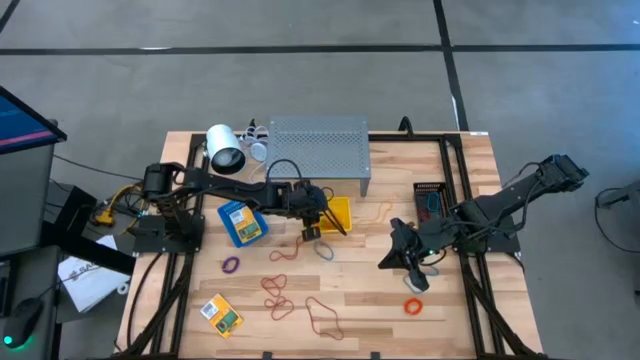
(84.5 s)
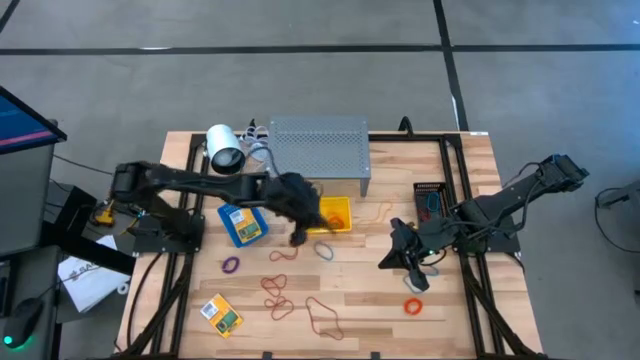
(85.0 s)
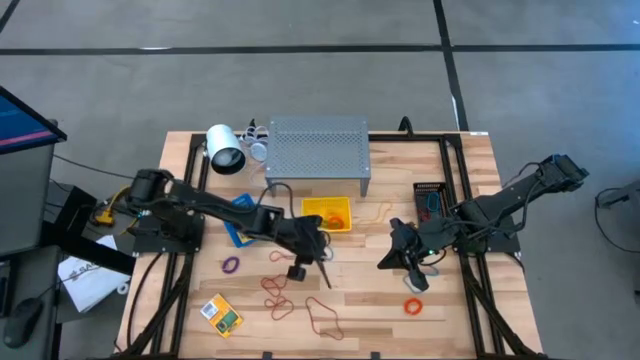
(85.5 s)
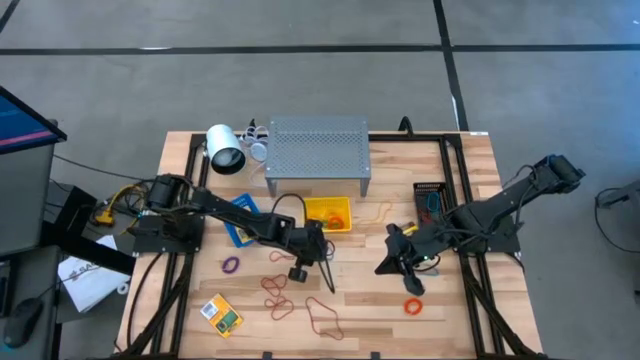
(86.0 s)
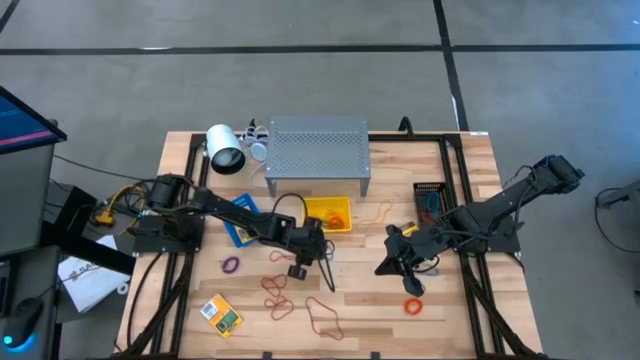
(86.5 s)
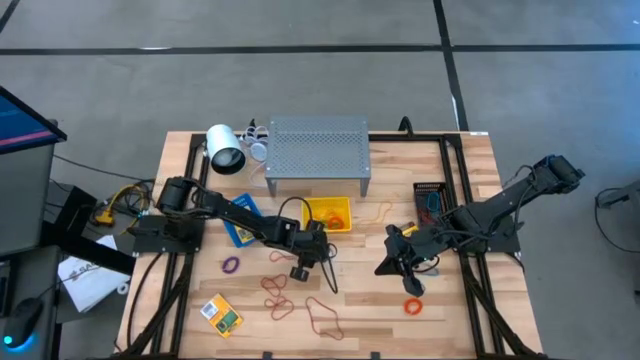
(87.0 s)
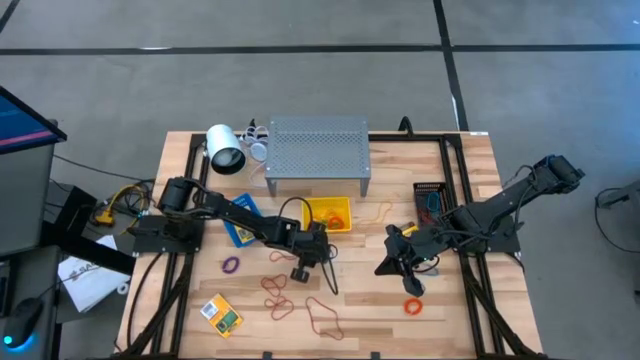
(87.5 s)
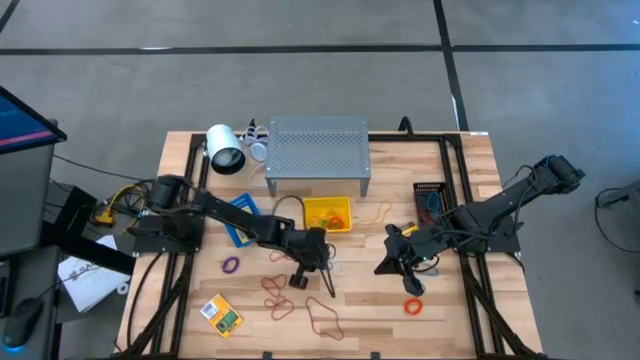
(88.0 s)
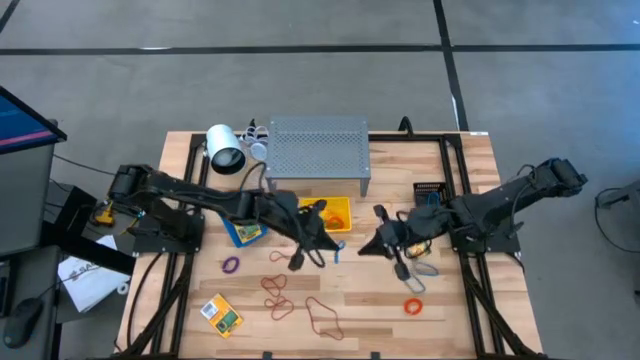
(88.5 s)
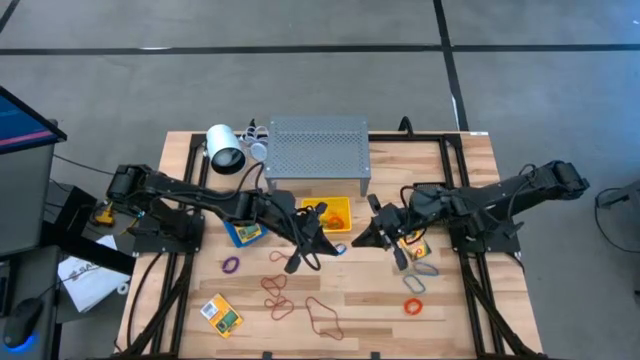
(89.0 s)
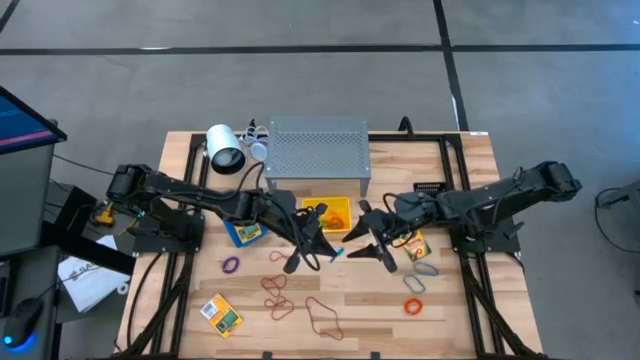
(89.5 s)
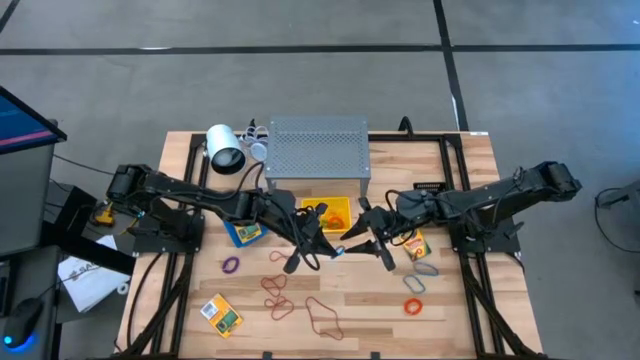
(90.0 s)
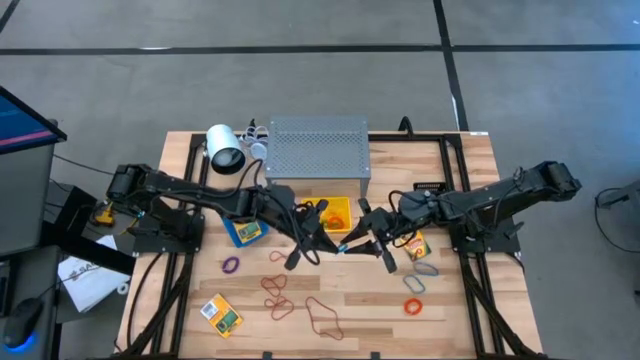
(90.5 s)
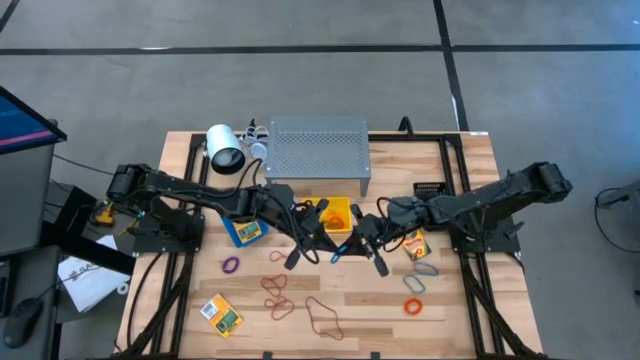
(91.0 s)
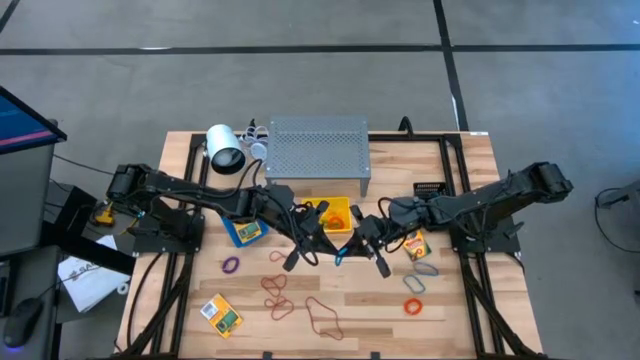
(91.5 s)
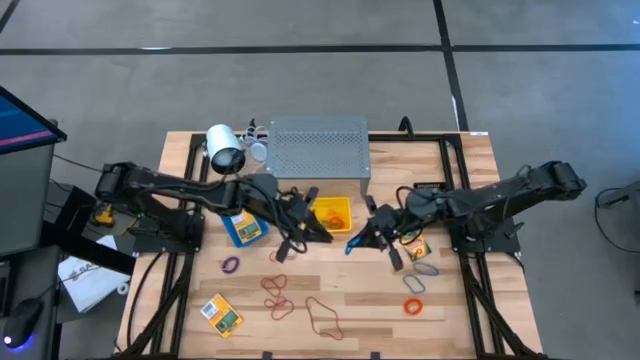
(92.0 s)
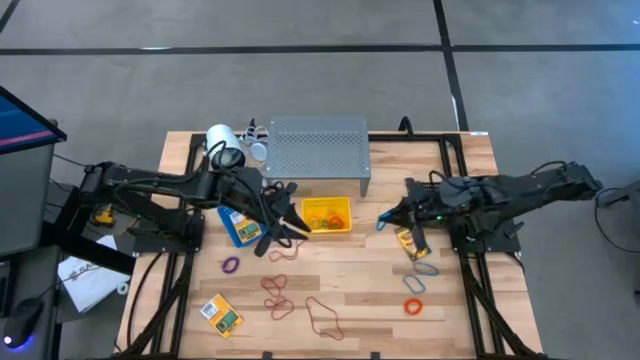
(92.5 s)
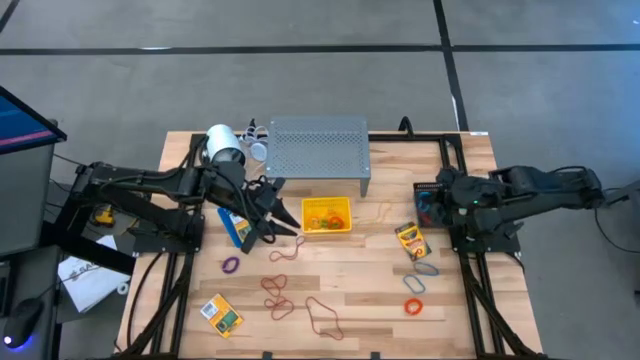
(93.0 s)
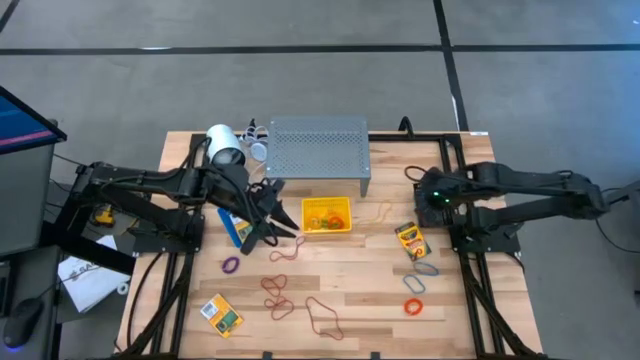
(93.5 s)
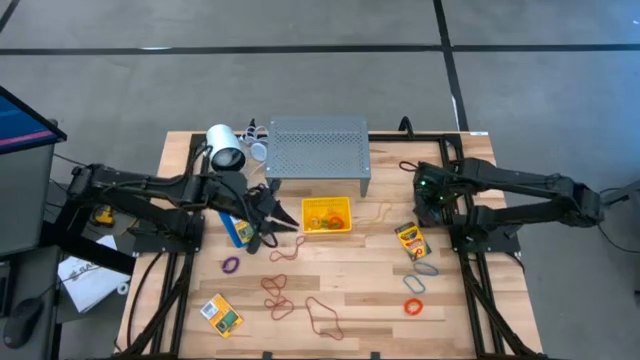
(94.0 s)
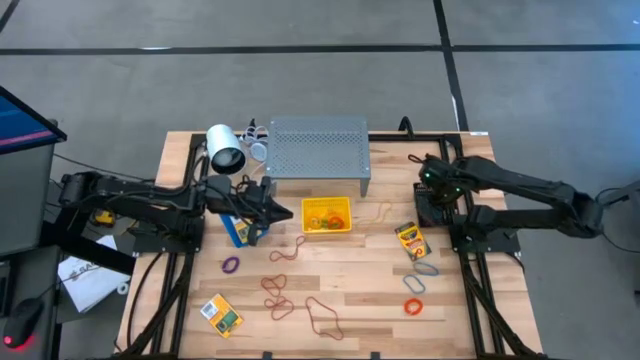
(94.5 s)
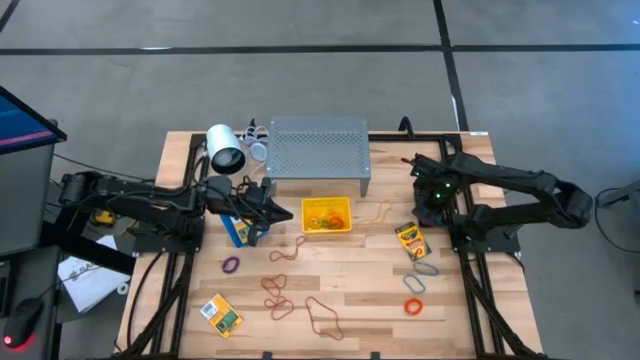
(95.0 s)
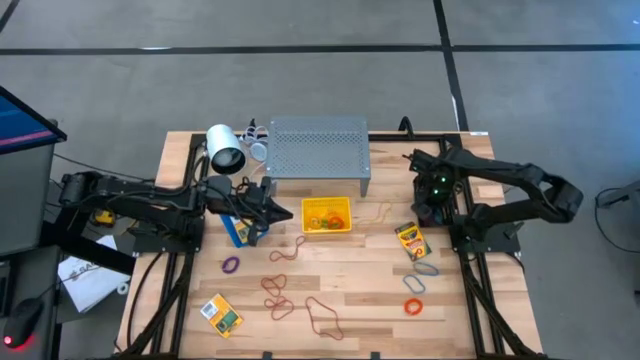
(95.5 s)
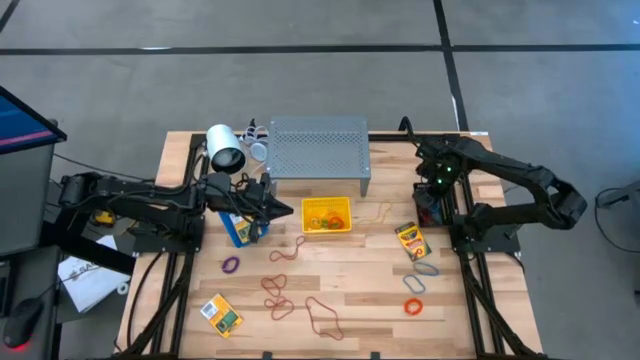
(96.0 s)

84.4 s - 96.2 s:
Task: Pick & Place Office Desk Supplies
Put the blue rubber band into the black bin

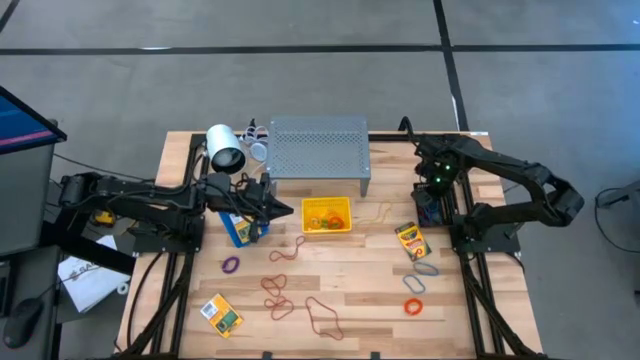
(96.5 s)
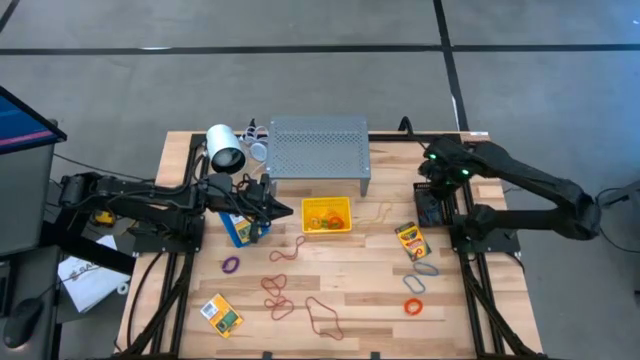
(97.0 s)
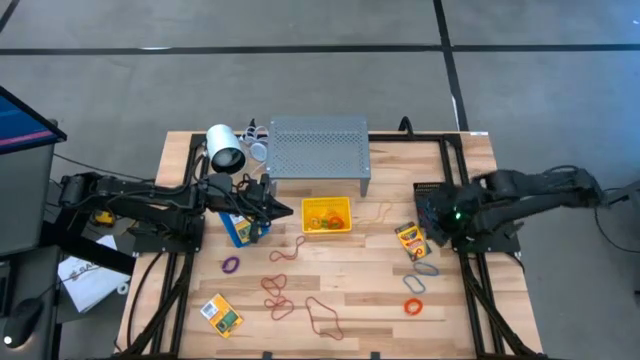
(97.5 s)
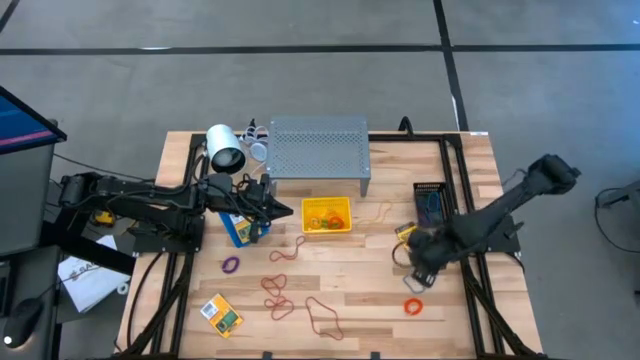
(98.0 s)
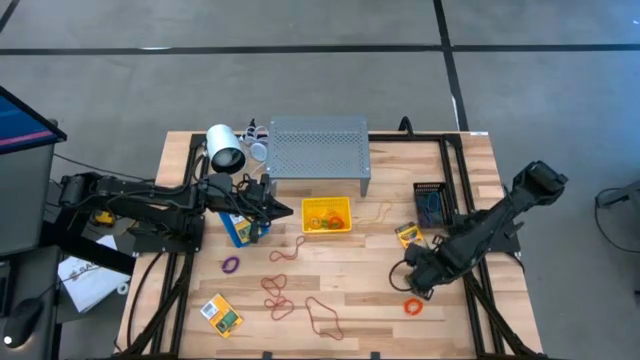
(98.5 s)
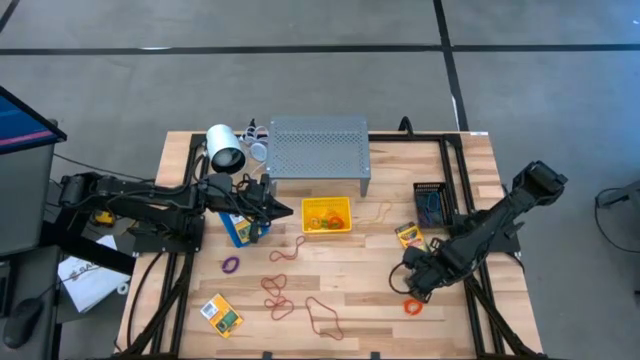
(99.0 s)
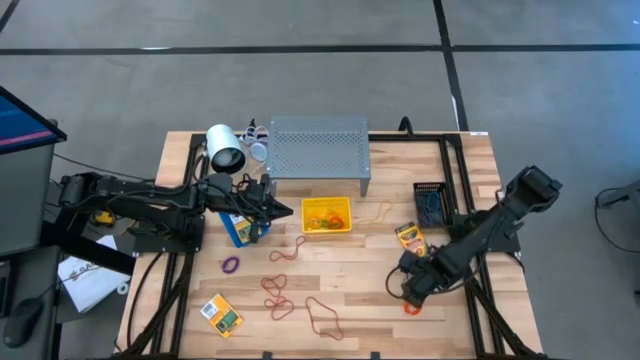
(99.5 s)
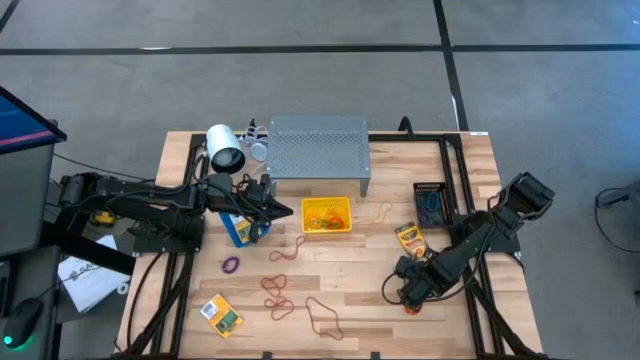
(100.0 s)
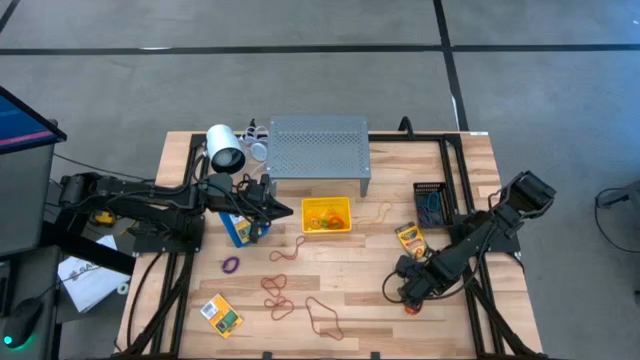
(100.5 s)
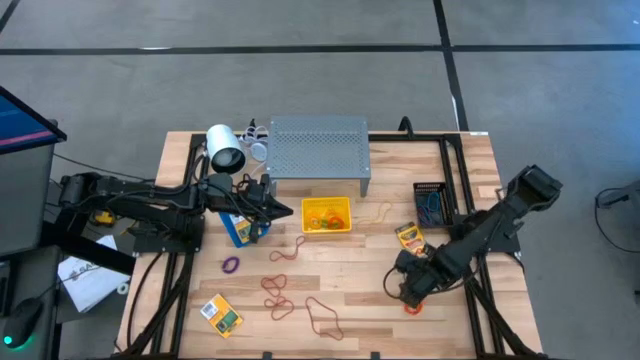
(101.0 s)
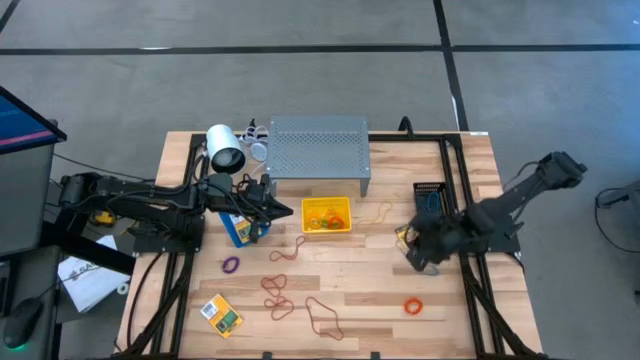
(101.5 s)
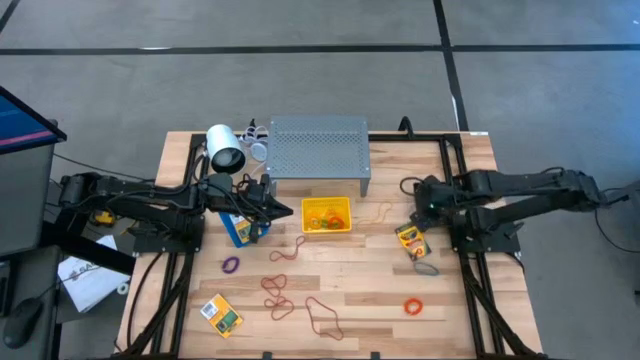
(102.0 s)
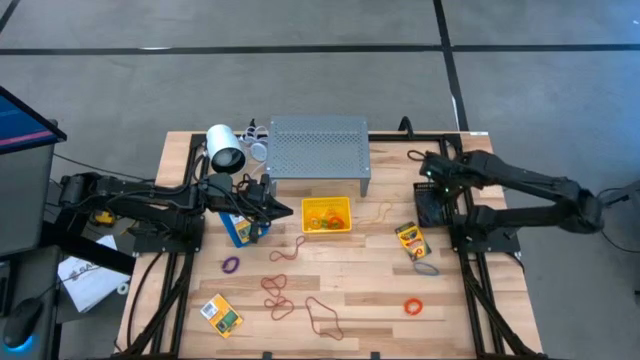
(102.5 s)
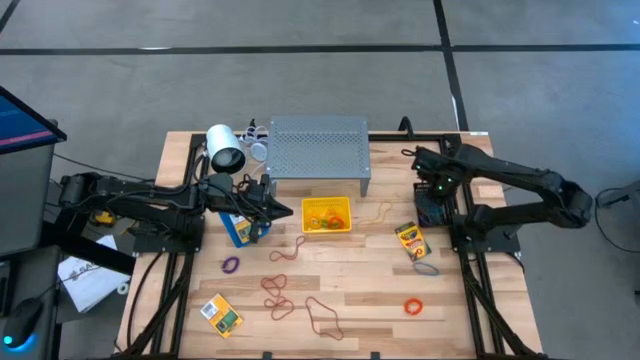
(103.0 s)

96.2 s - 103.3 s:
Put the blue rubber band into the black bin

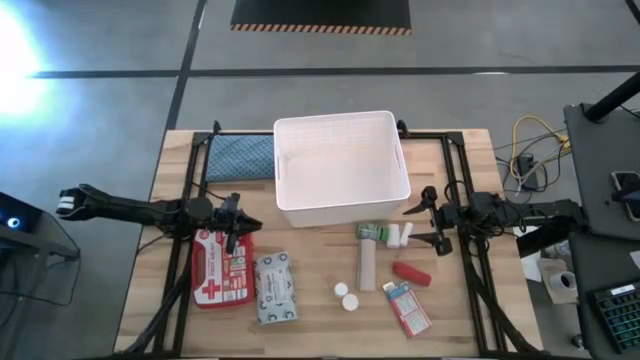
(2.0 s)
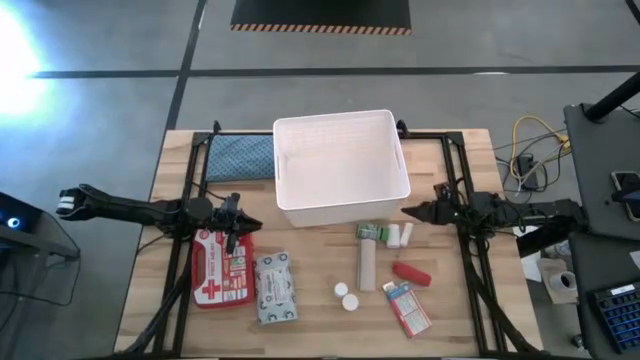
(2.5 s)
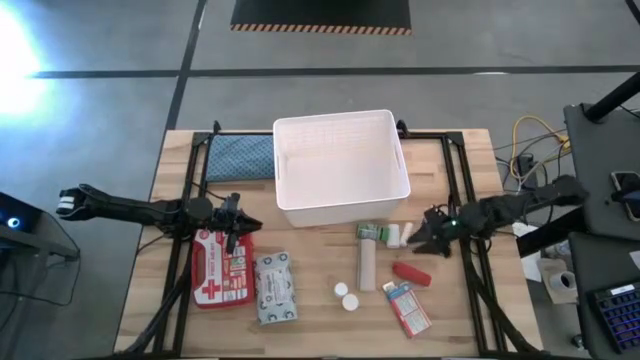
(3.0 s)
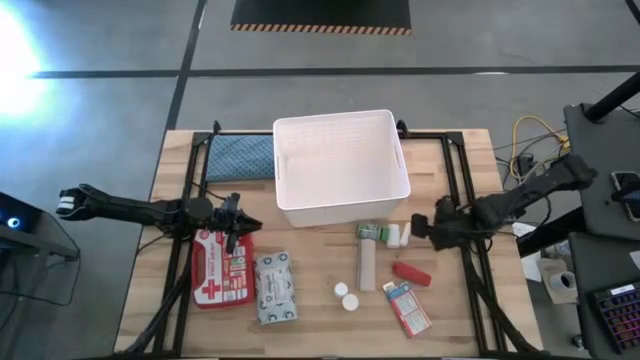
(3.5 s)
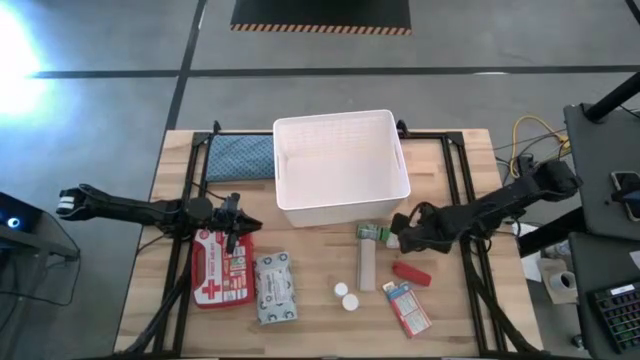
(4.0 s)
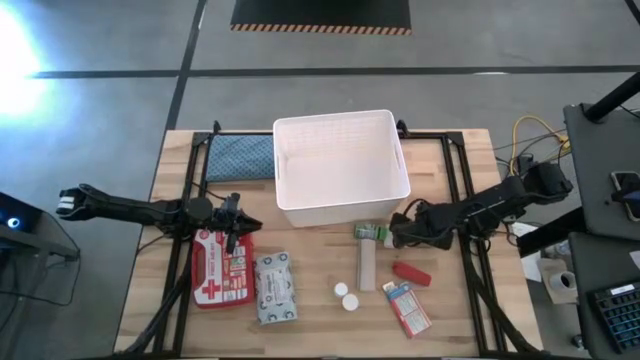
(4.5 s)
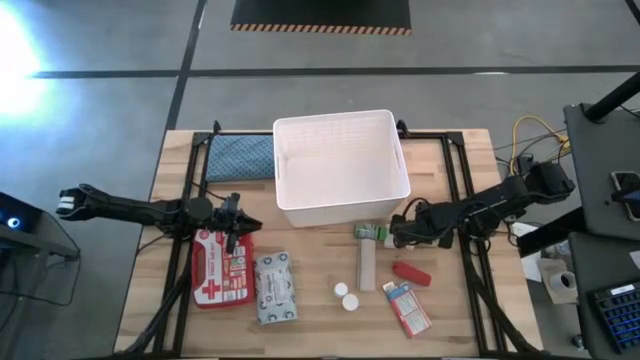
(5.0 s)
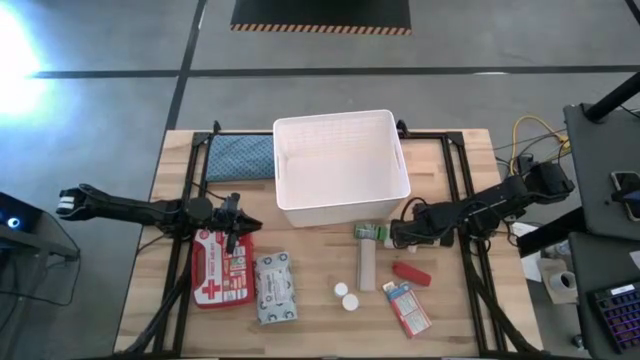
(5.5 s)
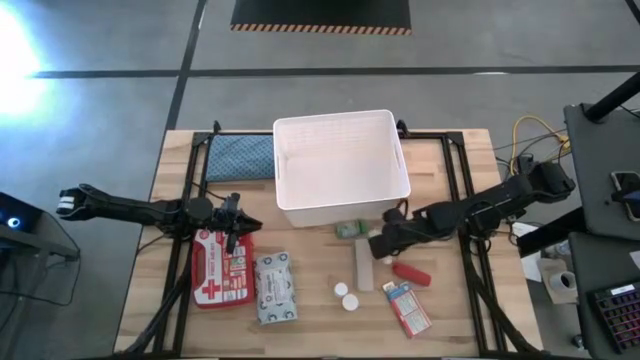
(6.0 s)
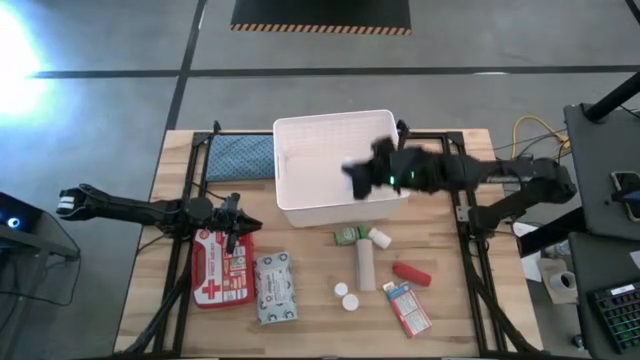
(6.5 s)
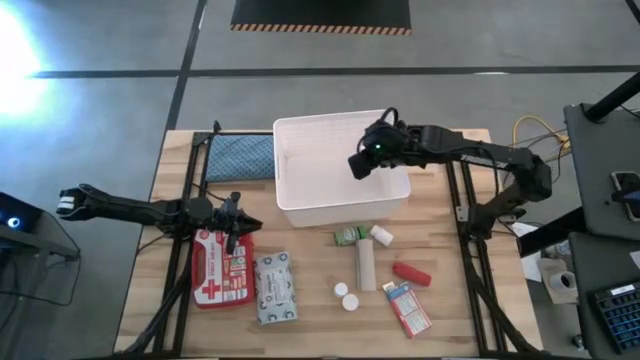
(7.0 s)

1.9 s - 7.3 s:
Task: Pick & place medical supplies in basket/bin
Put the white rolled gauze into the bin
